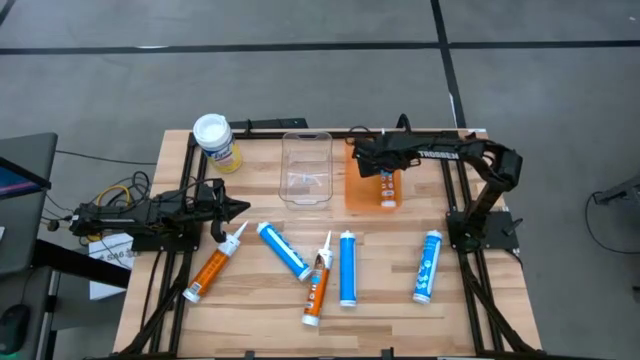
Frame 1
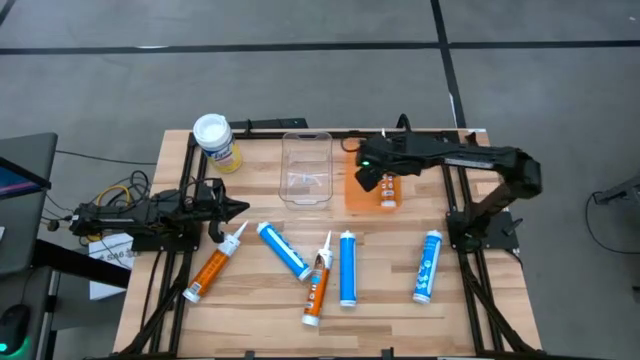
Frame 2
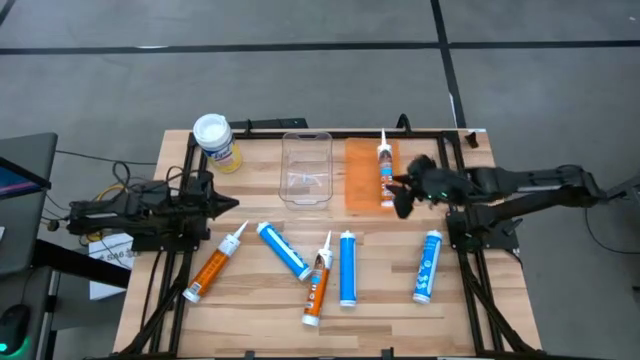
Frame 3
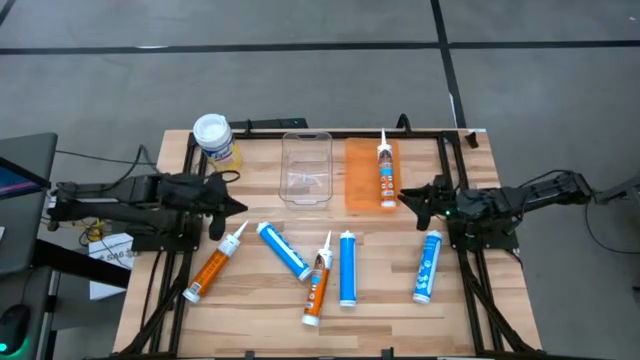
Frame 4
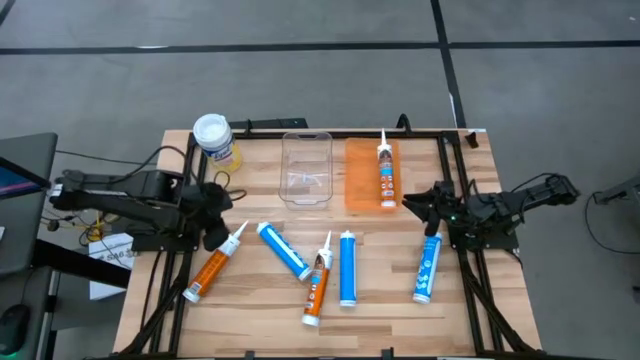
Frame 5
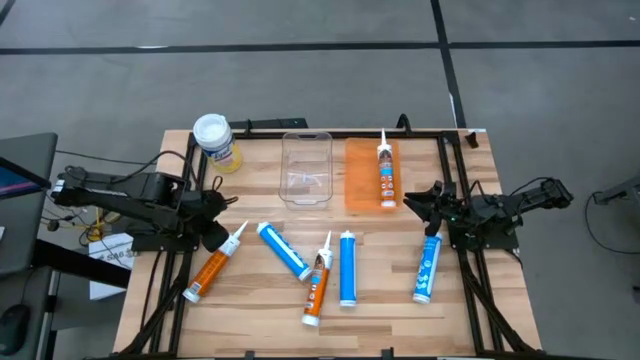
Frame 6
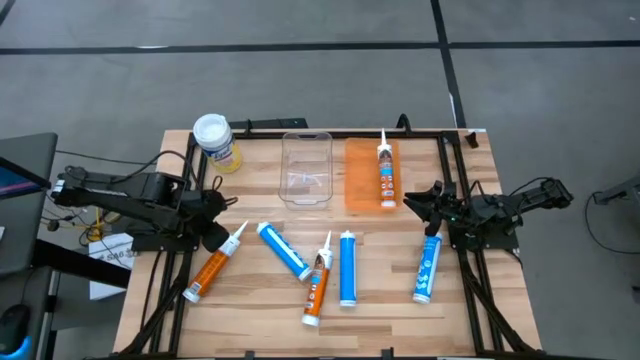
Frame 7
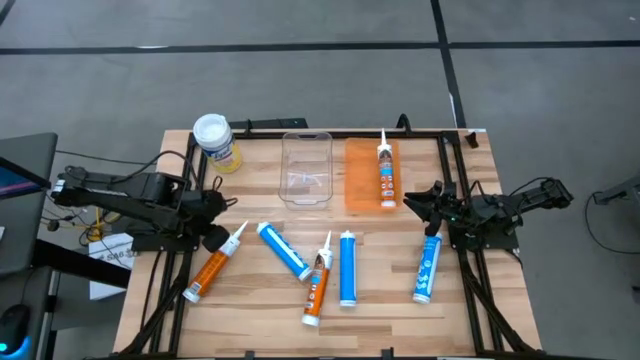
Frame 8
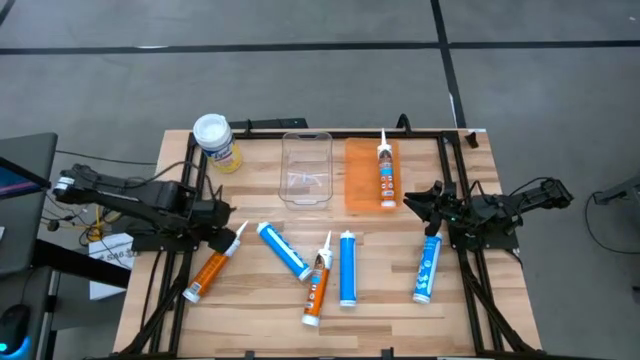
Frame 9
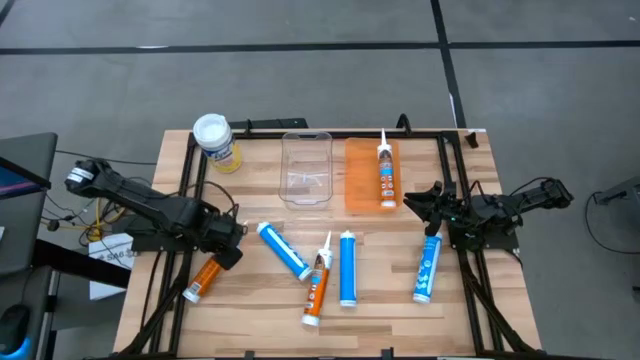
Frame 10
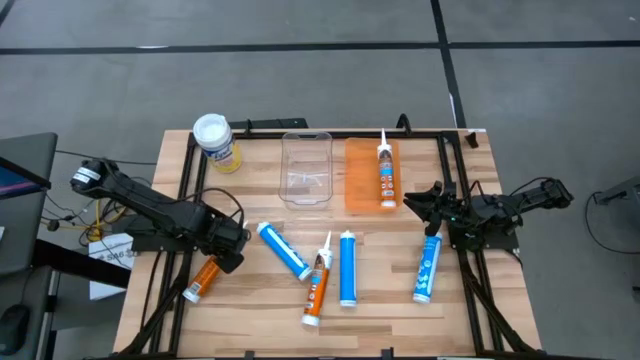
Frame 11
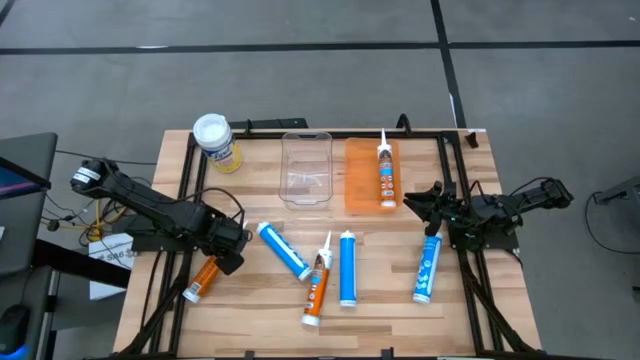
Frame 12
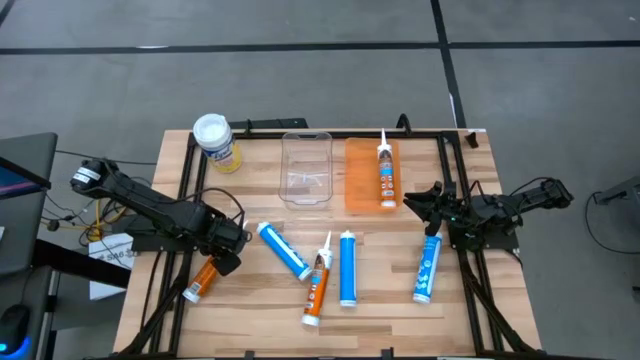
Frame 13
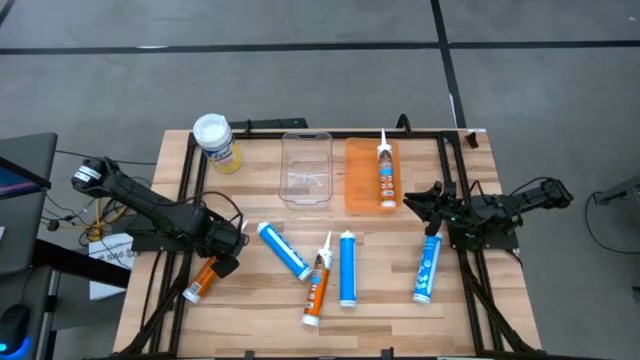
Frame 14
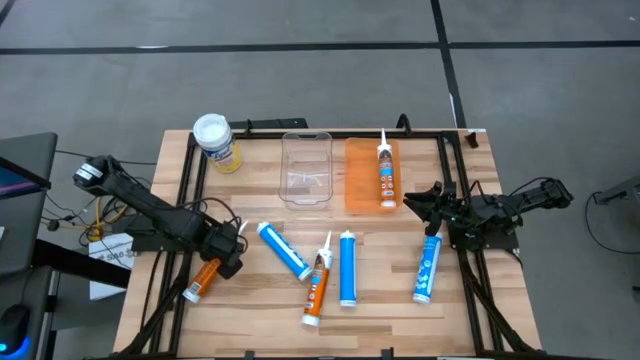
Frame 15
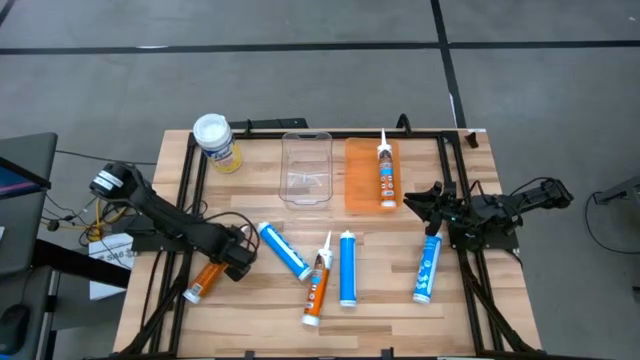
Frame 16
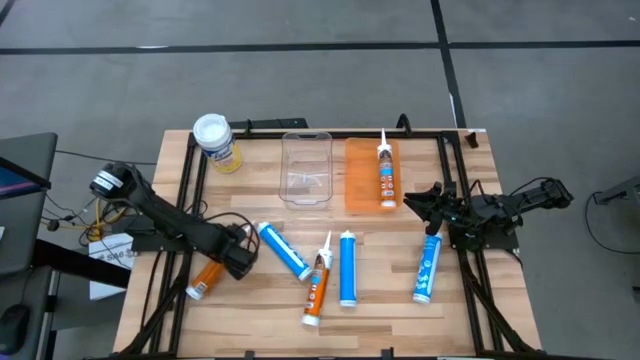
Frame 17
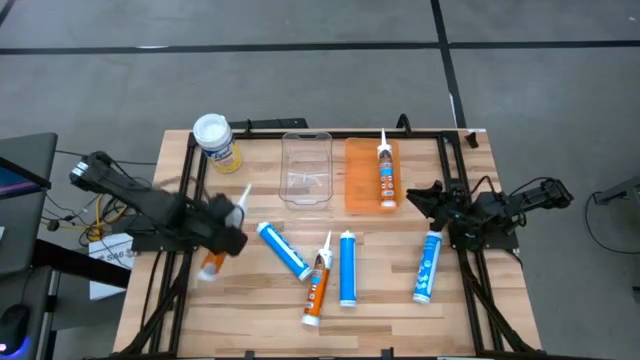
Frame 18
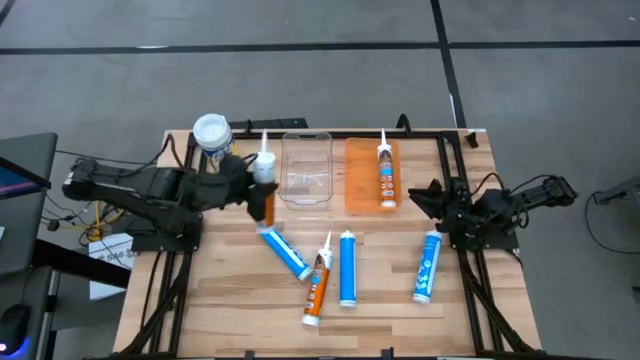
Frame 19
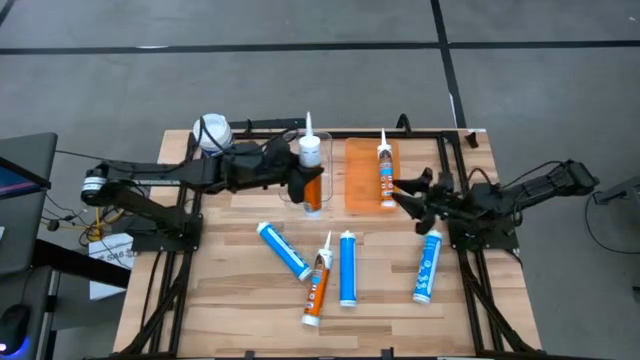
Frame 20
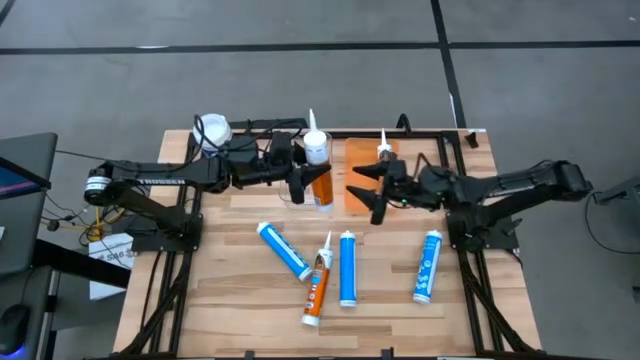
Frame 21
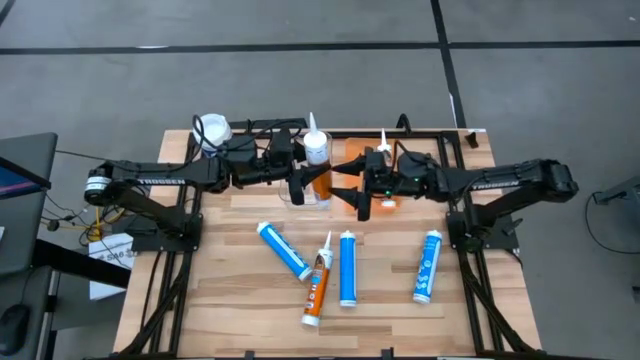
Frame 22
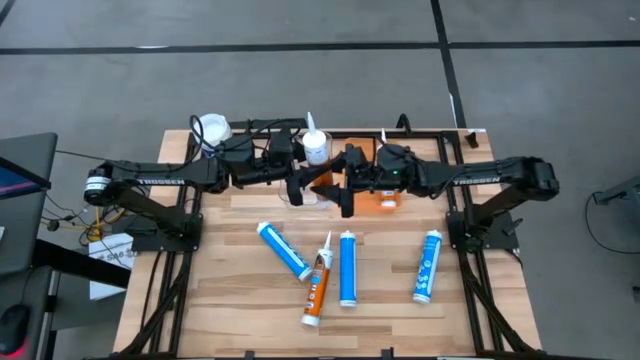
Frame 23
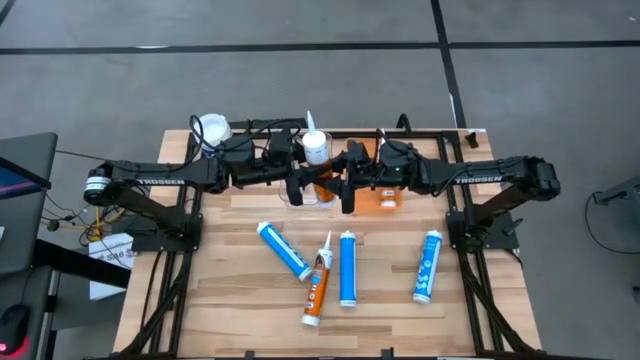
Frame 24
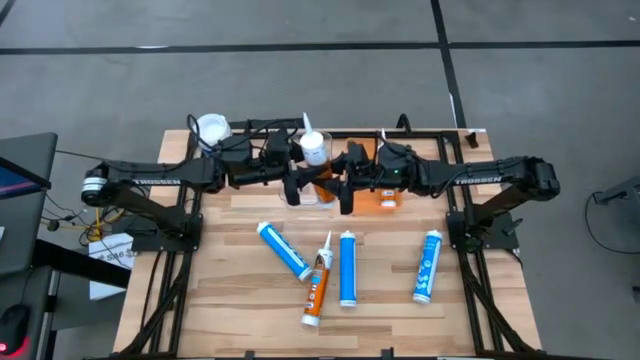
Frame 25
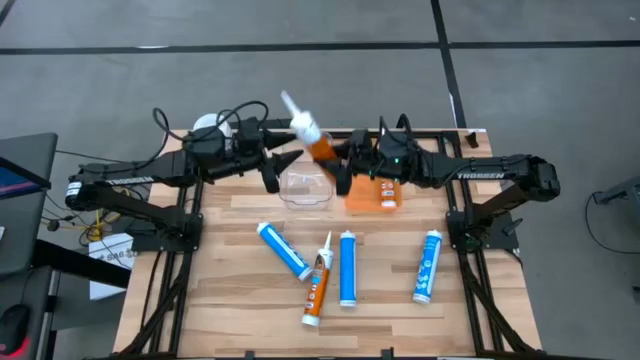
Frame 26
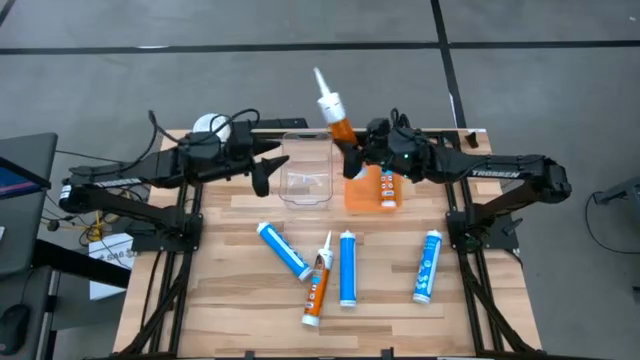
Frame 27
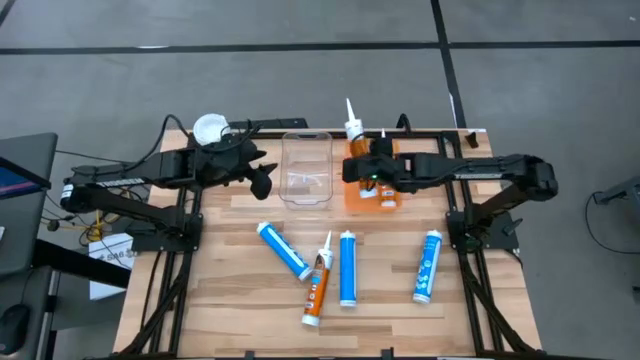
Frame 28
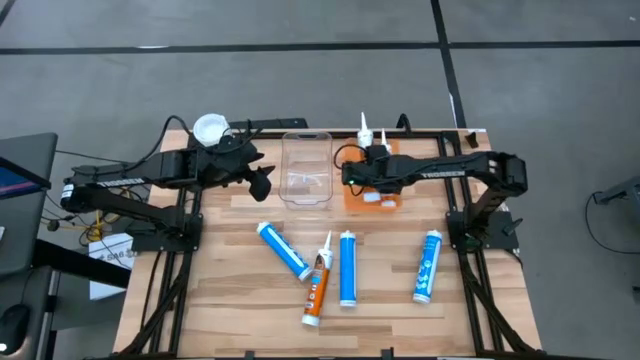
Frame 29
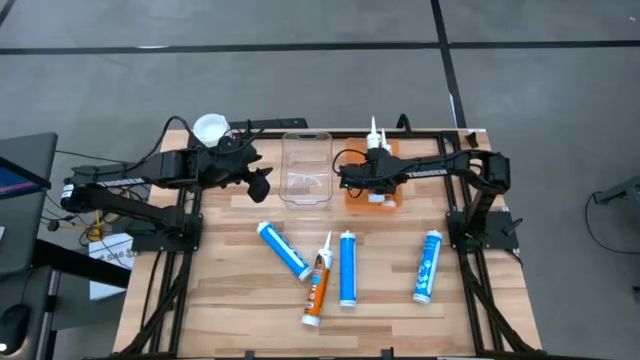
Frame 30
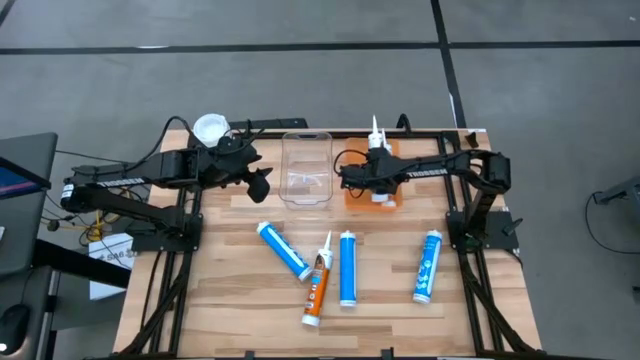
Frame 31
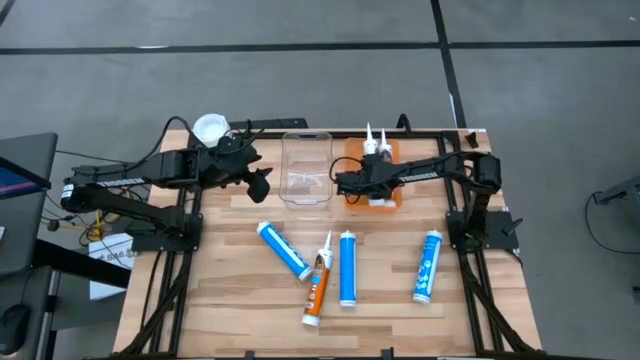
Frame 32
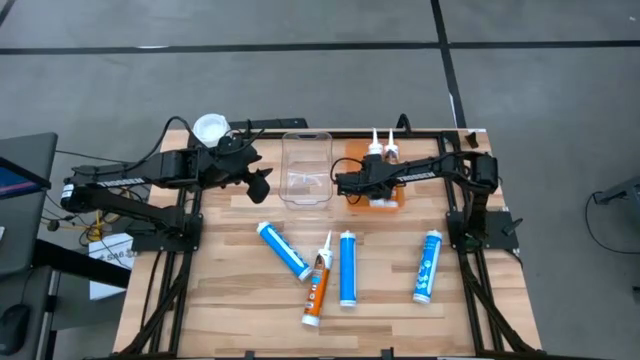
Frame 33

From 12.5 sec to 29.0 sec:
Task: Pick & place silicon tubes, Sealant and Lysol wipes
Put the left orange sealant into the orange bin

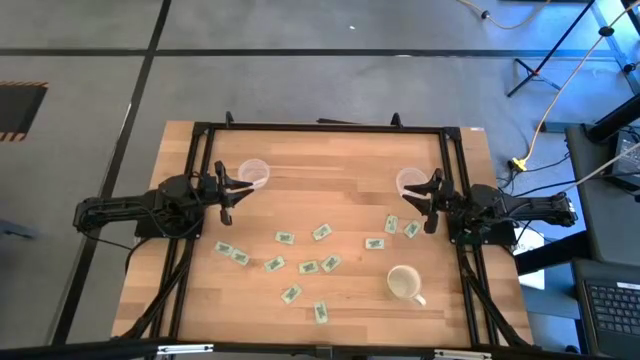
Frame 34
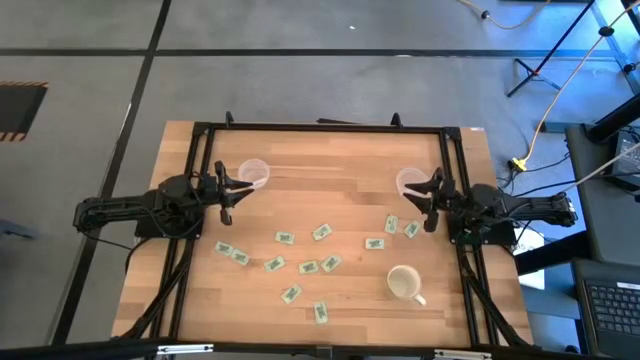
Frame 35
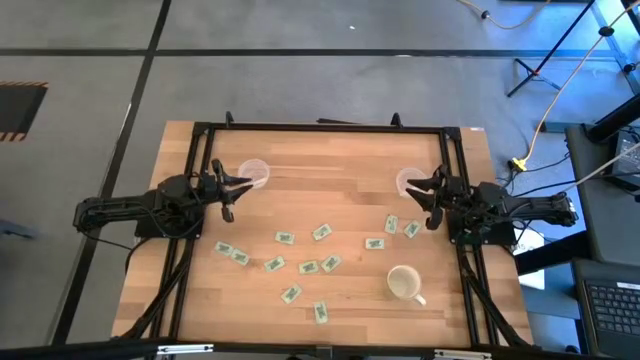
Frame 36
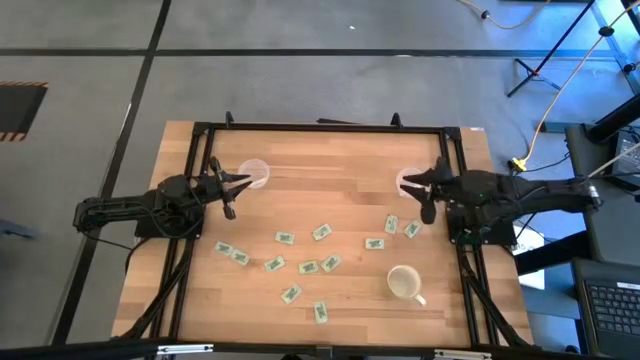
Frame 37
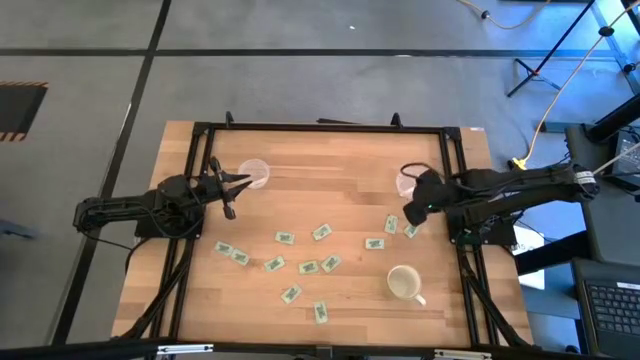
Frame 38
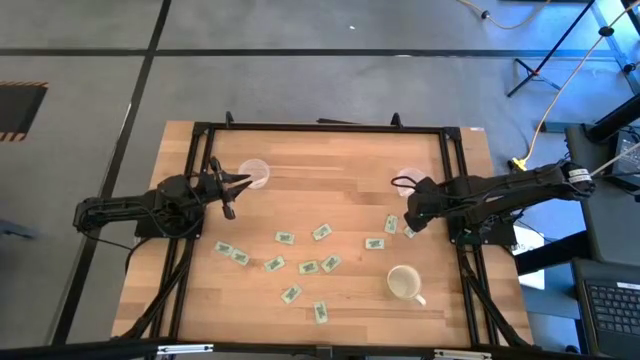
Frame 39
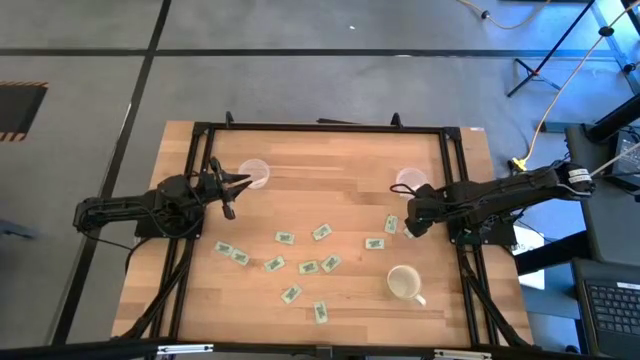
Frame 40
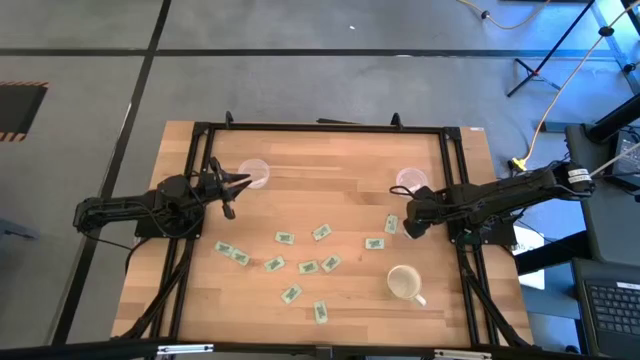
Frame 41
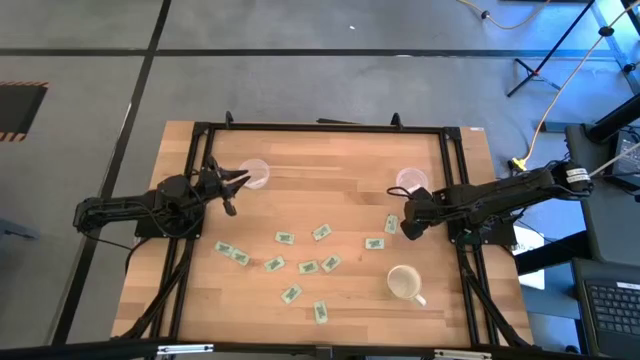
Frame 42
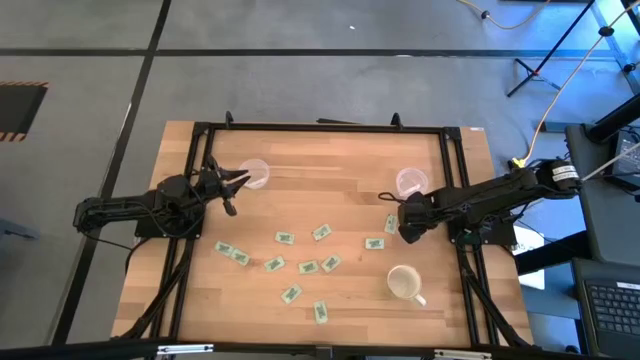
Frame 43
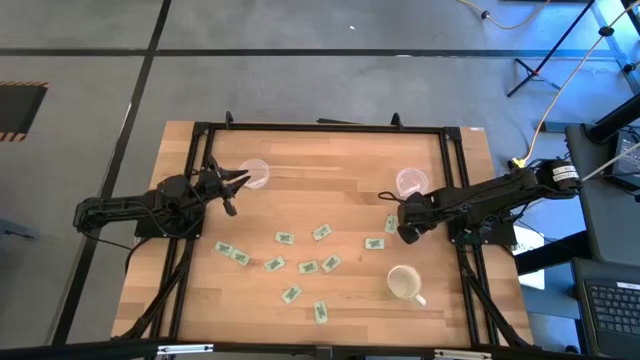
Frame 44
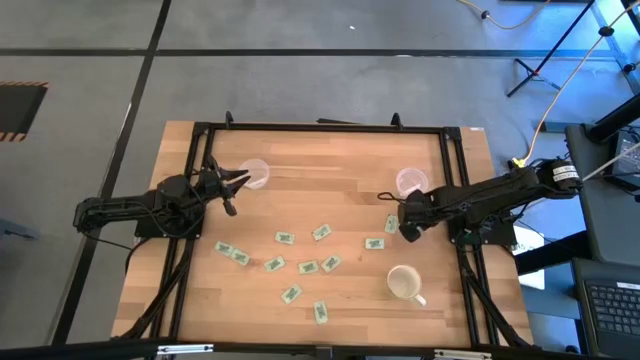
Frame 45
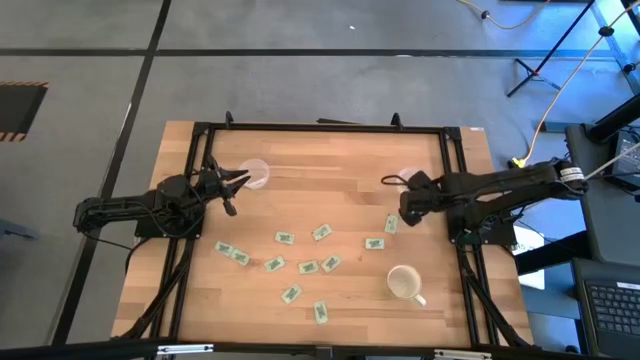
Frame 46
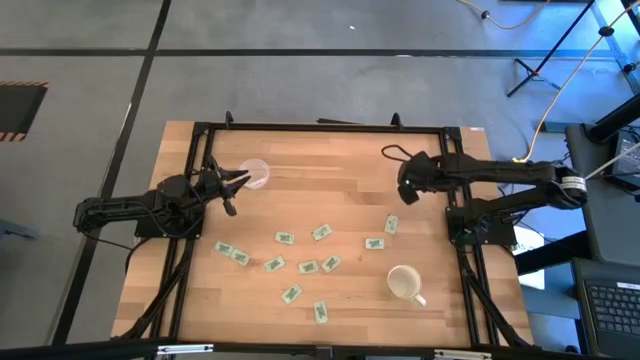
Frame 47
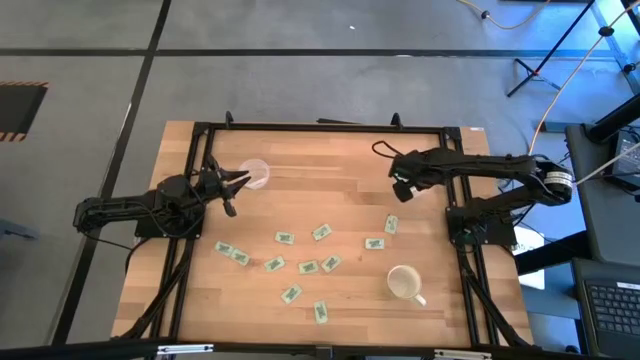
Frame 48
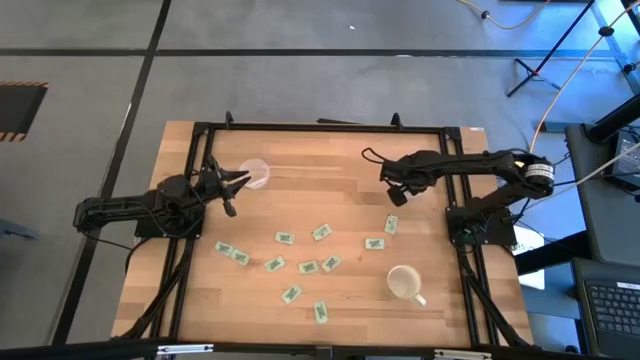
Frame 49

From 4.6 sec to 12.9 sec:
Task: Pick and place Stevia / Truvia into bins
Put the stevia packet into the right transparent container
